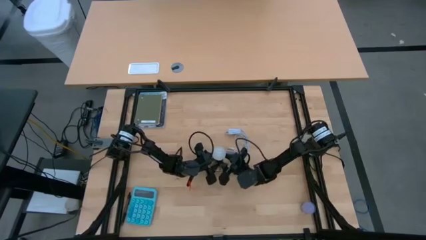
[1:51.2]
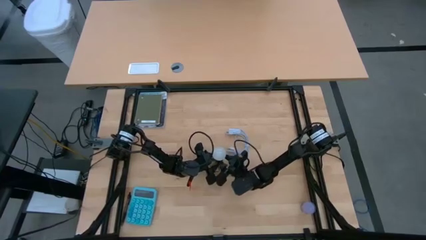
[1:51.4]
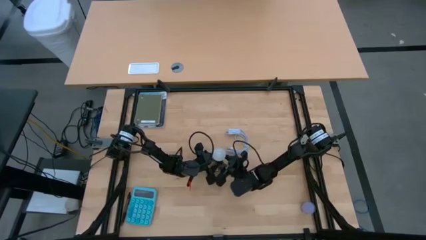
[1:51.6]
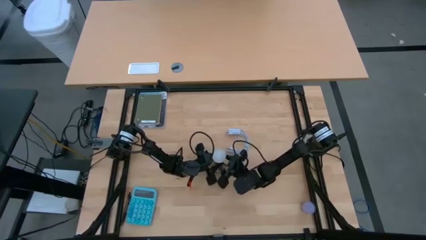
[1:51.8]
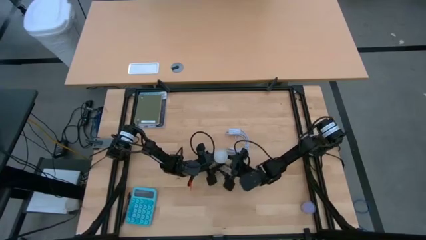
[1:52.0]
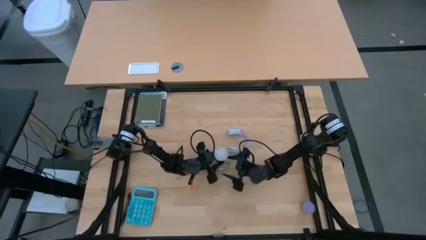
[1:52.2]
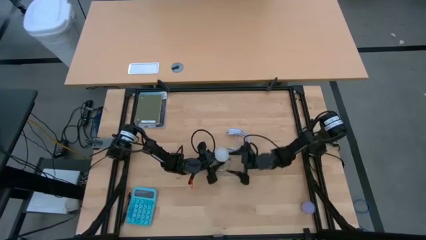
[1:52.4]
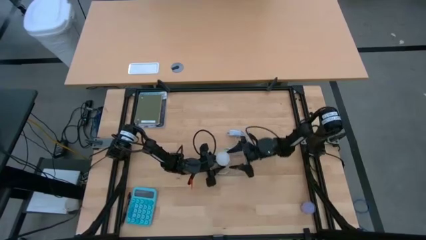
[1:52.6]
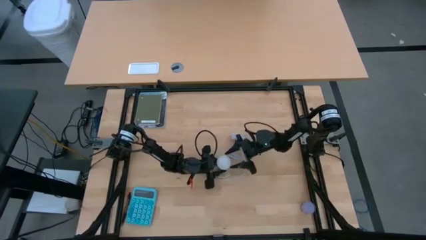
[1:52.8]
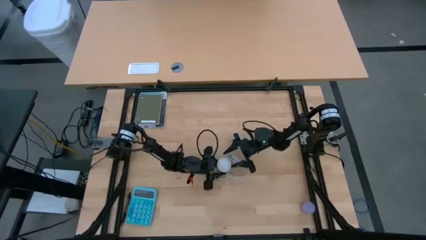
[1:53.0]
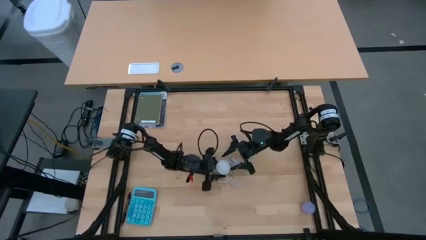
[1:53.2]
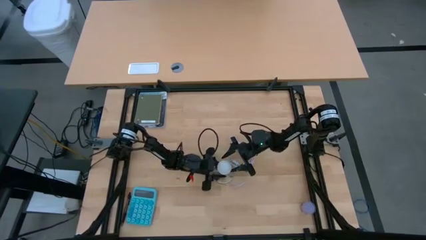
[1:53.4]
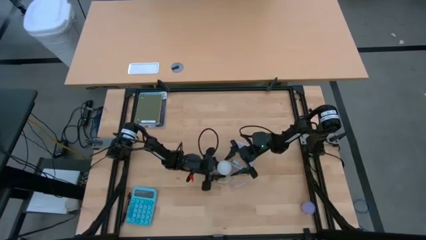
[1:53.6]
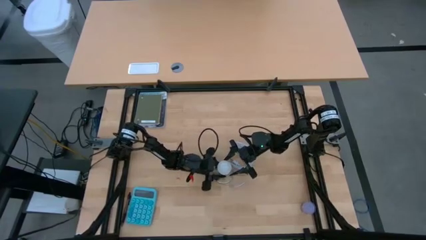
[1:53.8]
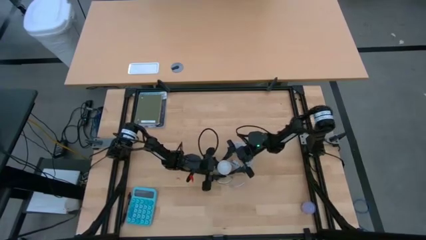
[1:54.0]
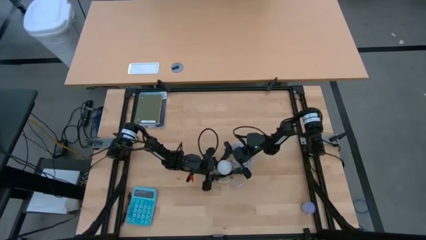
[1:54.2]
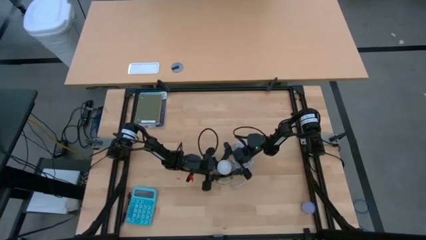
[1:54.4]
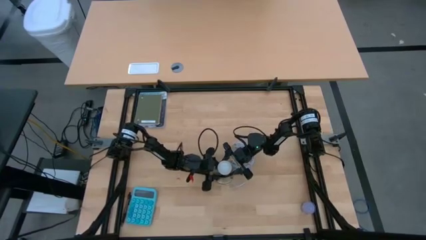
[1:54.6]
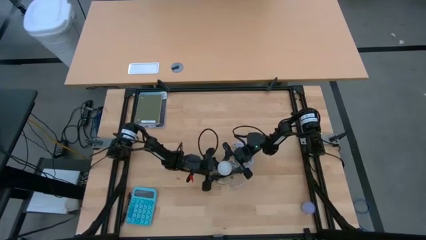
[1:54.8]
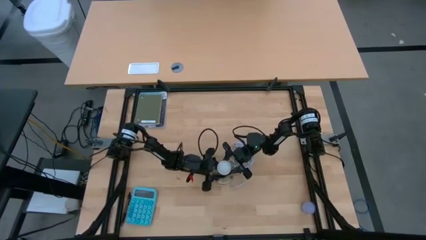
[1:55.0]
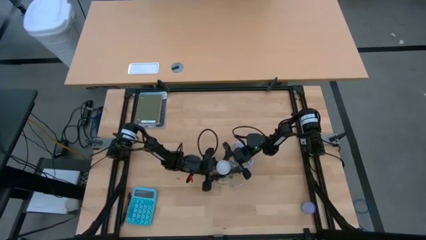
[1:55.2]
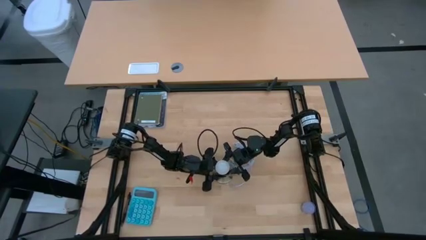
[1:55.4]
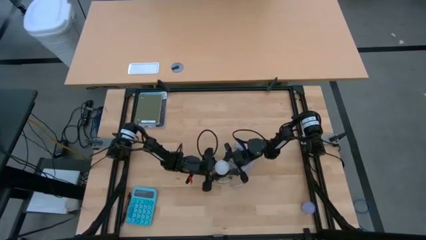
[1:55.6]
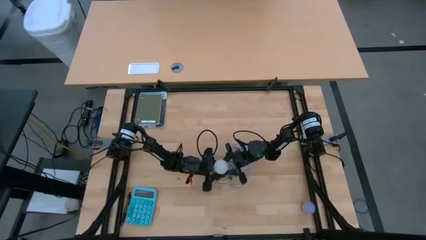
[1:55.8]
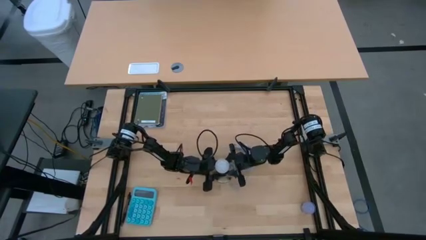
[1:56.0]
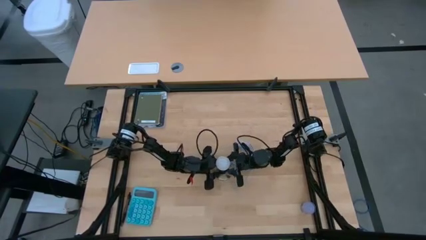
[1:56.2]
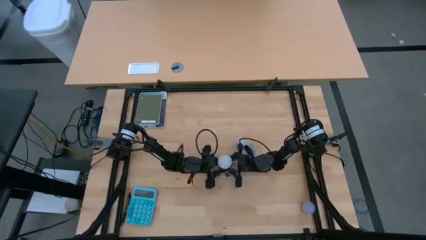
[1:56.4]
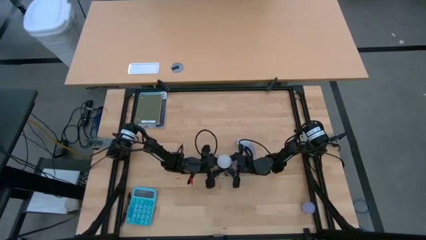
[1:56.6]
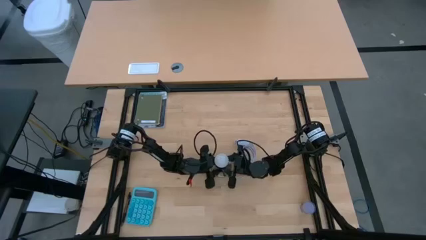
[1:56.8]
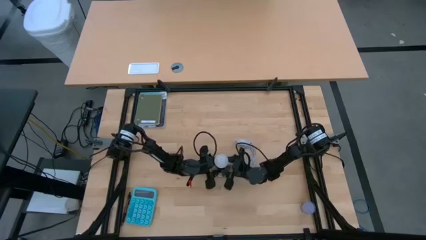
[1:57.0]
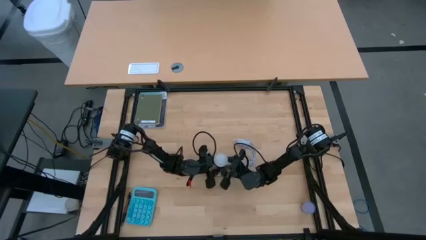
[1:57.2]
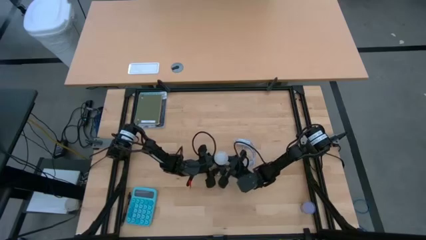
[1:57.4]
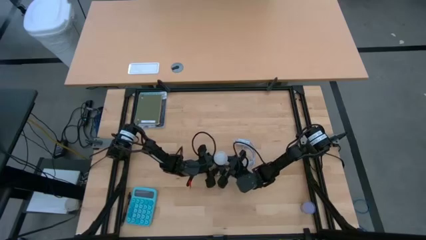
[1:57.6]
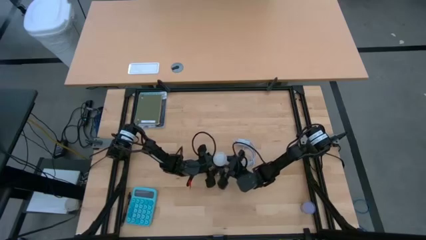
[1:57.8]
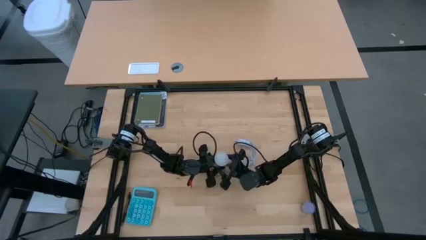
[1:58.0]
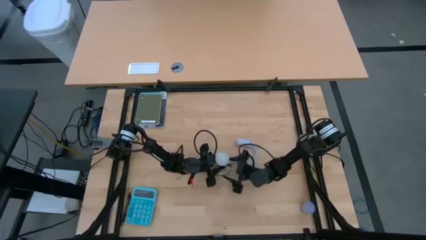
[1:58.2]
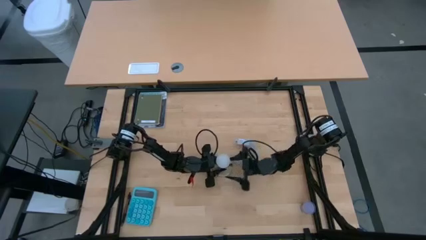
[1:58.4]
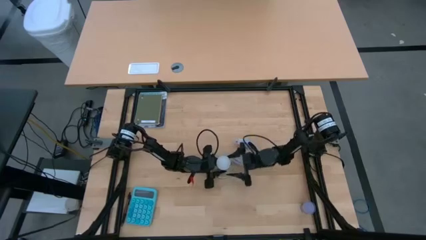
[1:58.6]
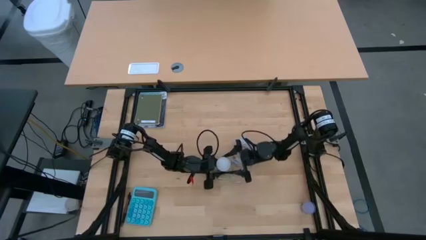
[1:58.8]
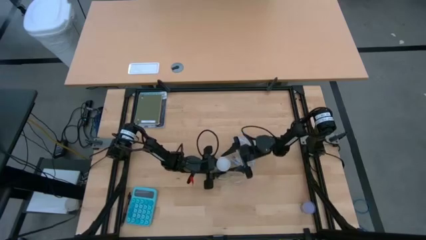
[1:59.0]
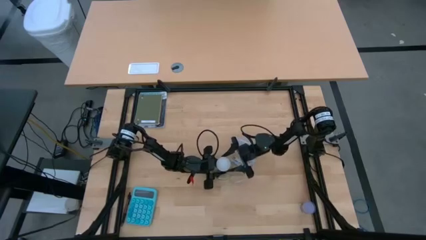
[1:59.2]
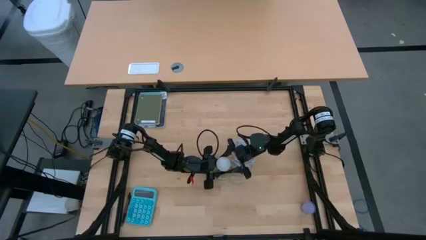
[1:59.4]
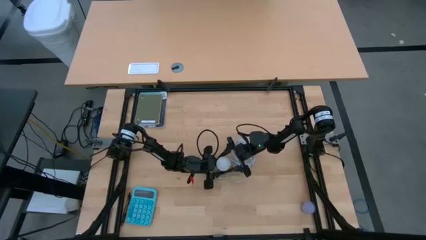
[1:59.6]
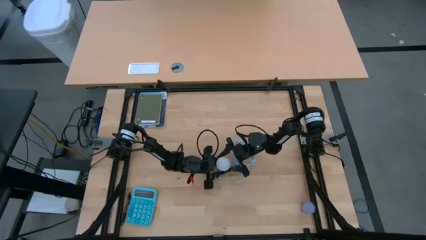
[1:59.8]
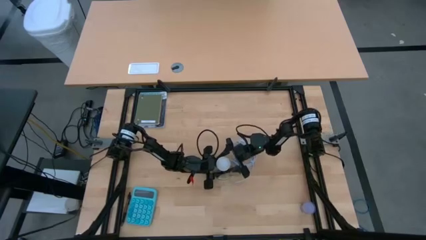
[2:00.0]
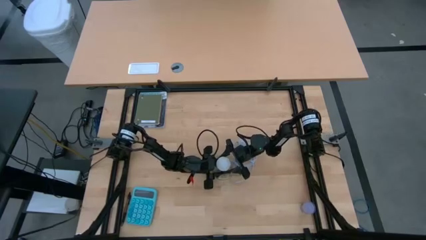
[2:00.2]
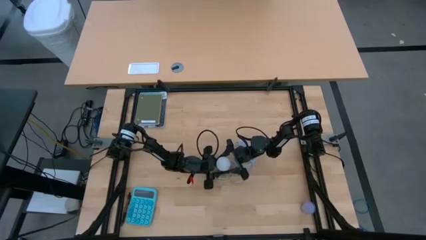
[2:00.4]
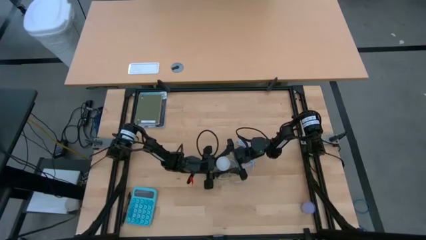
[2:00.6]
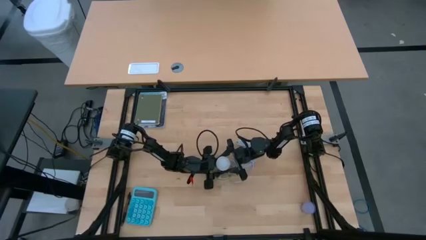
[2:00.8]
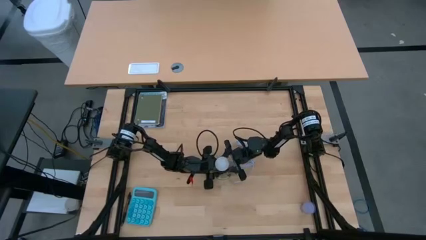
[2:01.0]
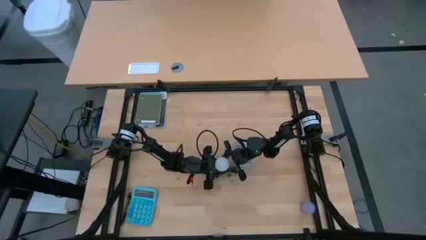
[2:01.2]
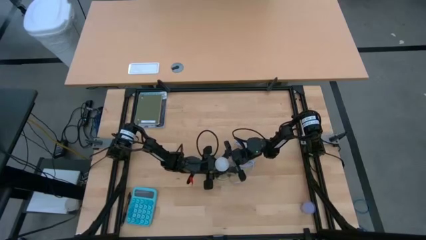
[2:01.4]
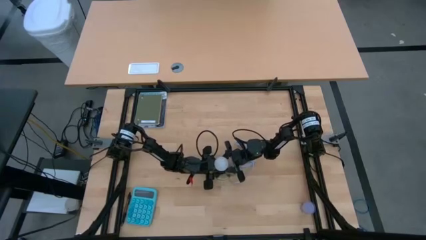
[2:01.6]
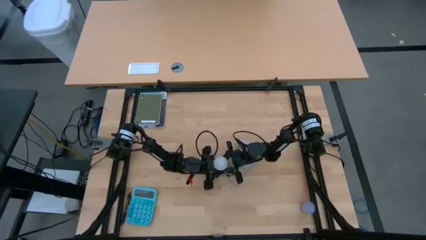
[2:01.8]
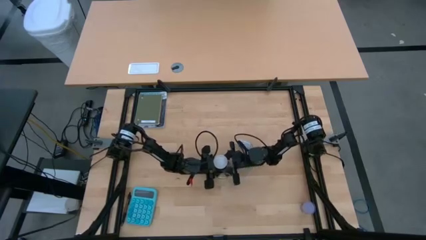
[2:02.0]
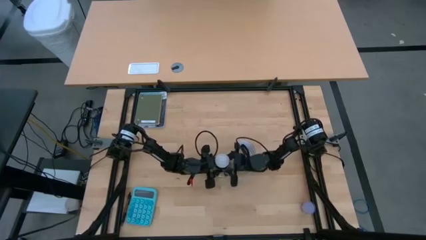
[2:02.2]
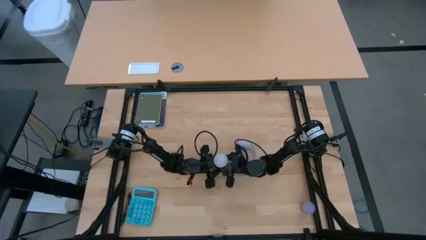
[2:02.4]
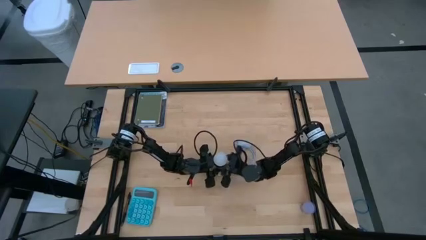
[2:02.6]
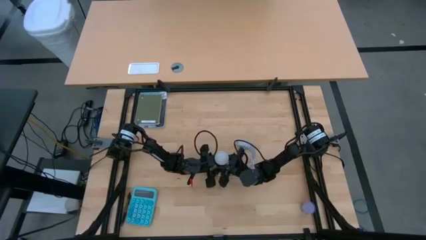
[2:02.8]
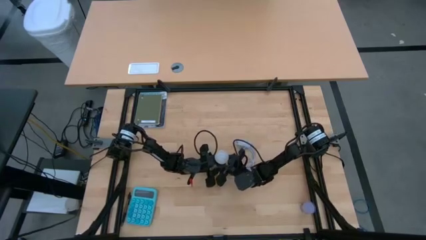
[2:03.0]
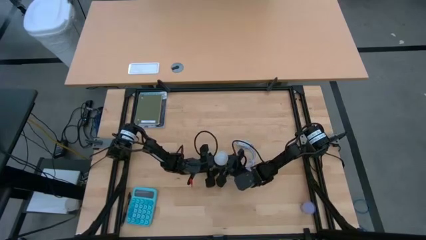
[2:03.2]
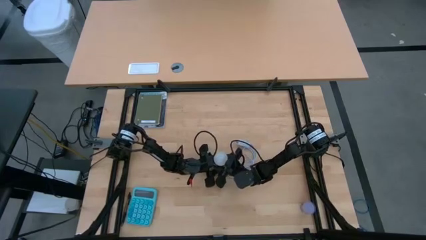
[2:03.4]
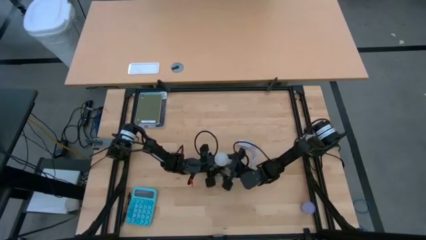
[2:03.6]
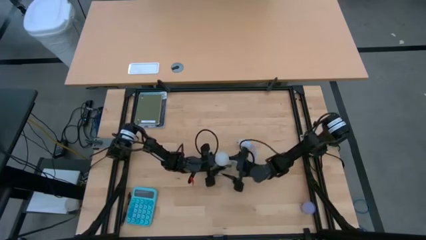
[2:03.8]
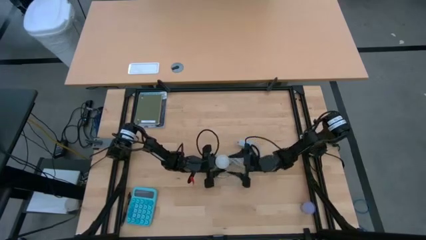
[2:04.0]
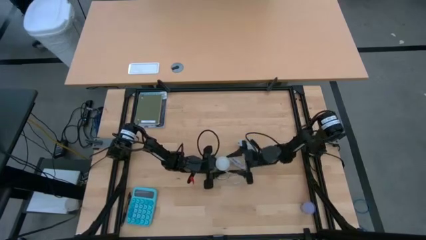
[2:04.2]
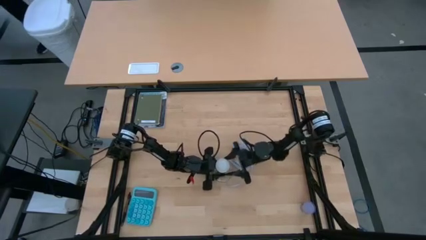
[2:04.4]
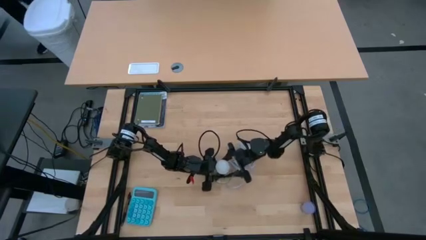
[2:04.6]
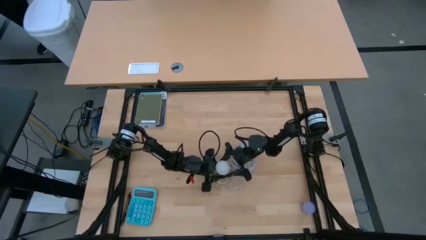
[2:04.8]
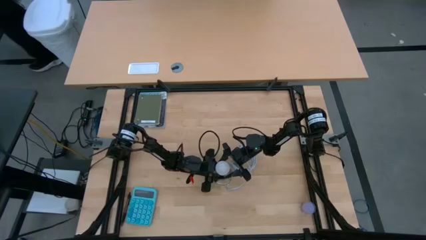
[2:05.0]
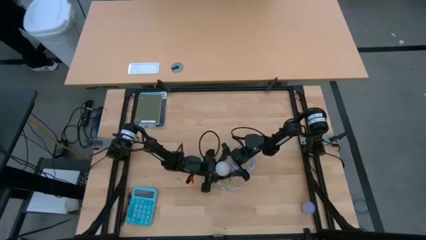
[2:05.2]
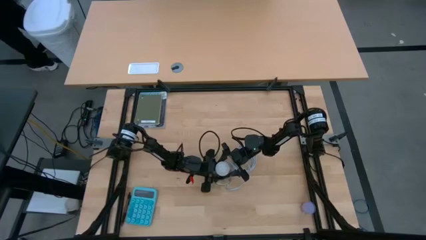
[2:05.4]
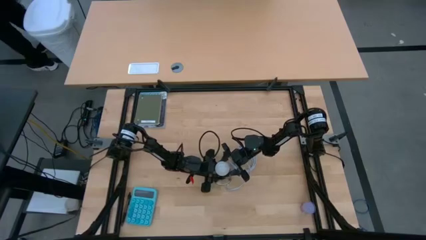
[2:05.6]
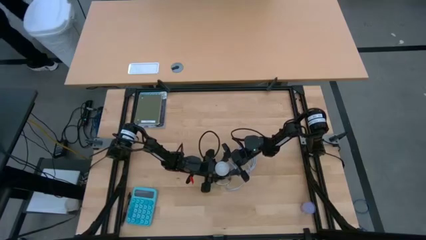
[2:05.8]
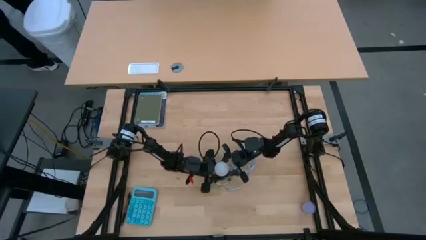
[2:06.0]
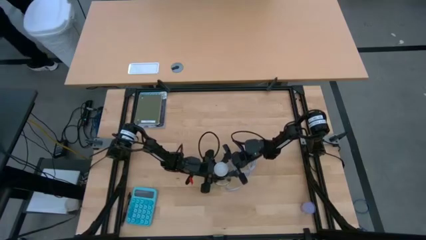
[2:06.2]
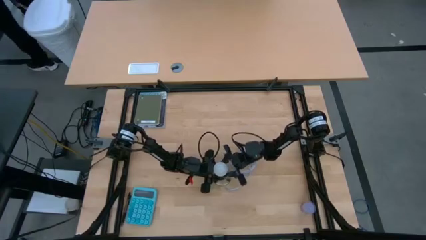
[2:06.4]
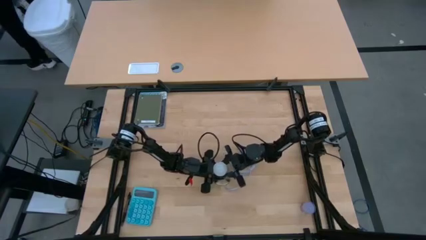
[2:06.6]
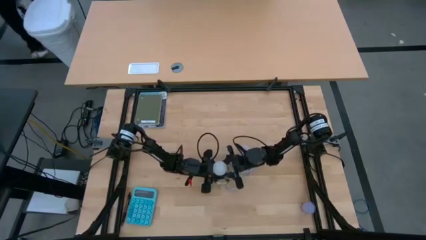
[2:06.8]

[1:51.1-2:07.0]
Task: Screw lightbulb
Remove the lightbulb from the lamp
